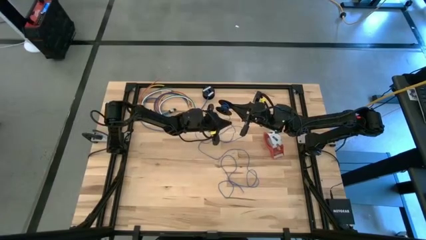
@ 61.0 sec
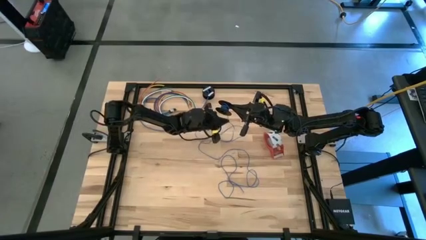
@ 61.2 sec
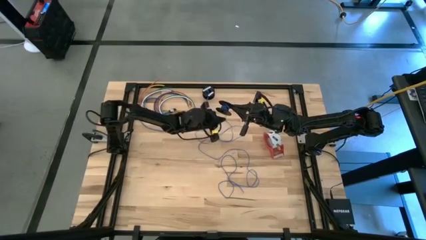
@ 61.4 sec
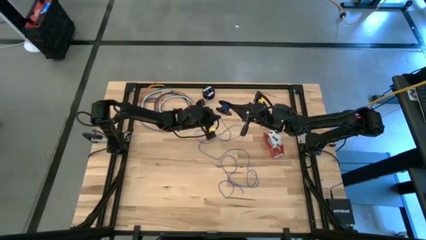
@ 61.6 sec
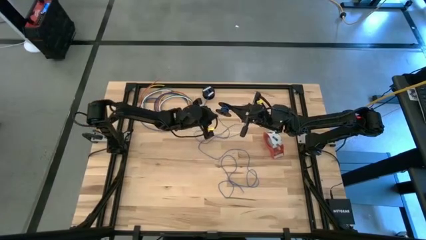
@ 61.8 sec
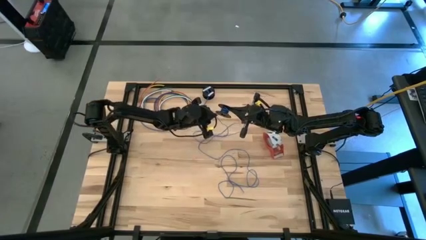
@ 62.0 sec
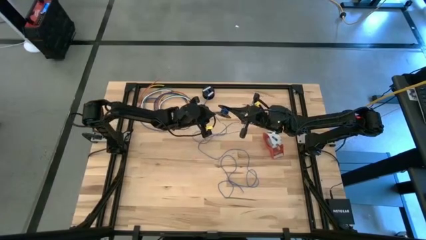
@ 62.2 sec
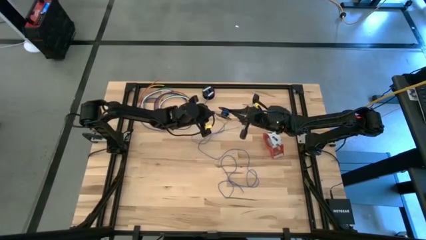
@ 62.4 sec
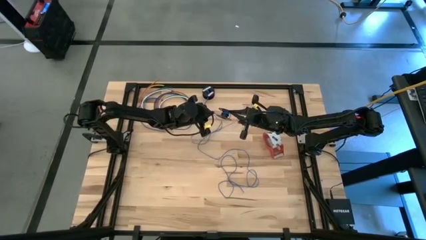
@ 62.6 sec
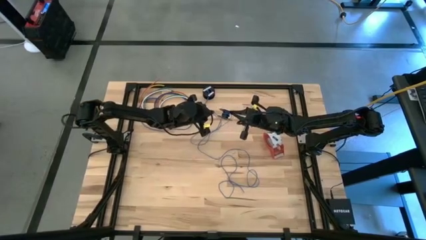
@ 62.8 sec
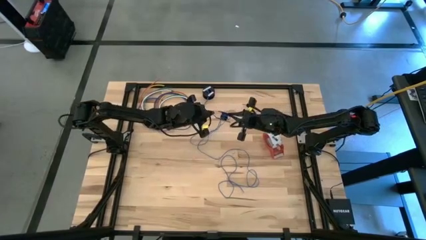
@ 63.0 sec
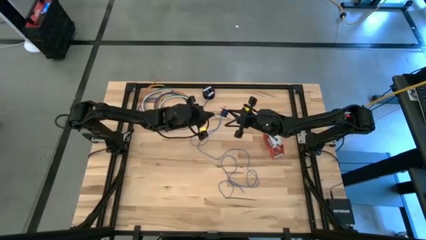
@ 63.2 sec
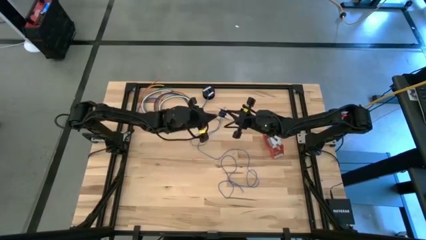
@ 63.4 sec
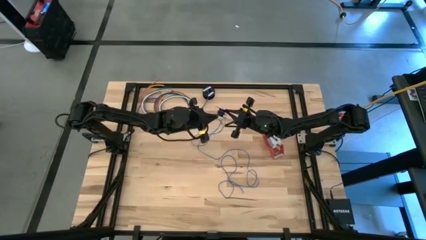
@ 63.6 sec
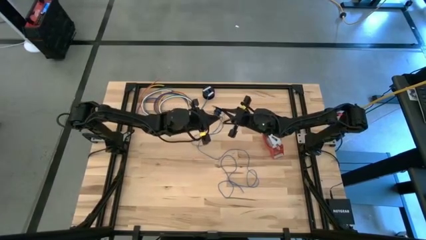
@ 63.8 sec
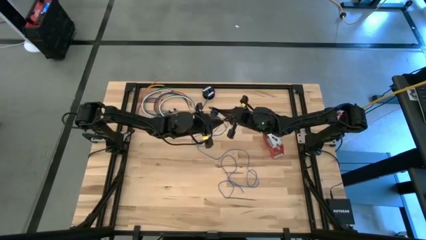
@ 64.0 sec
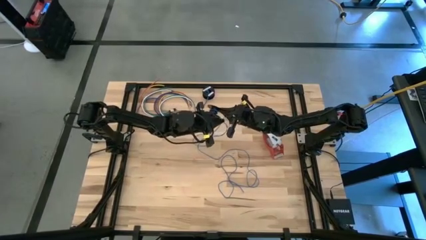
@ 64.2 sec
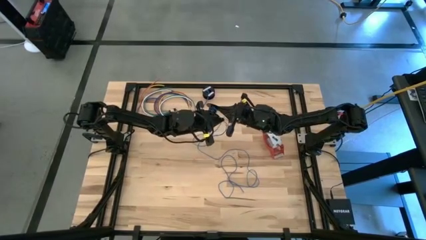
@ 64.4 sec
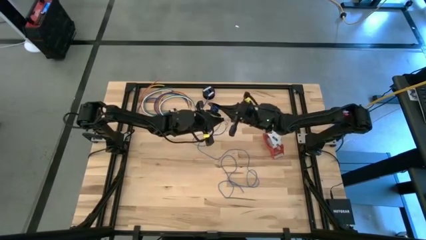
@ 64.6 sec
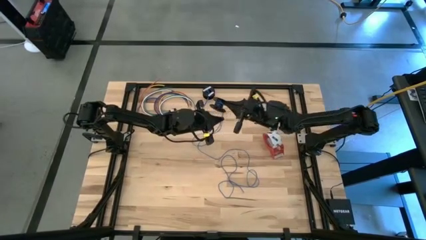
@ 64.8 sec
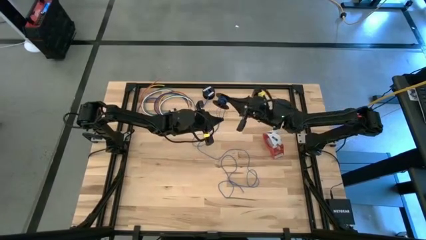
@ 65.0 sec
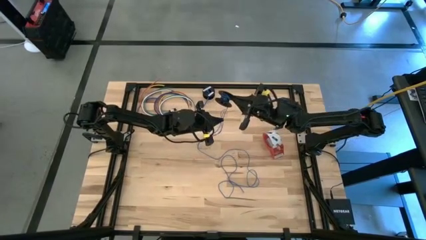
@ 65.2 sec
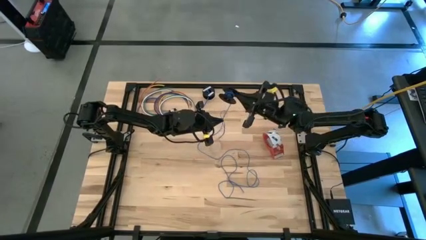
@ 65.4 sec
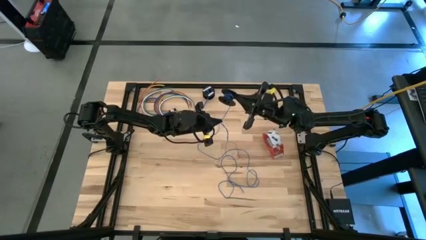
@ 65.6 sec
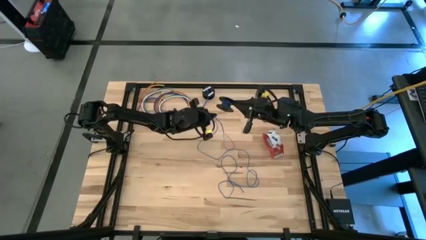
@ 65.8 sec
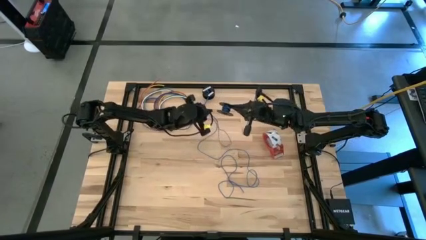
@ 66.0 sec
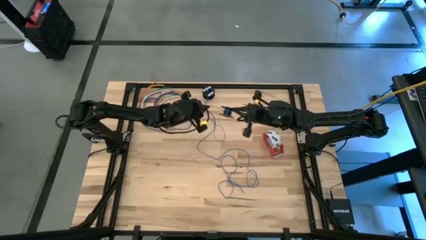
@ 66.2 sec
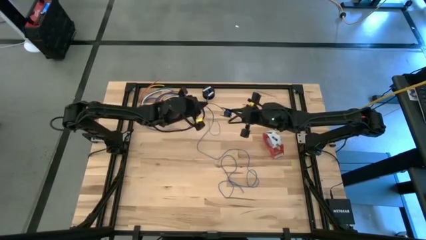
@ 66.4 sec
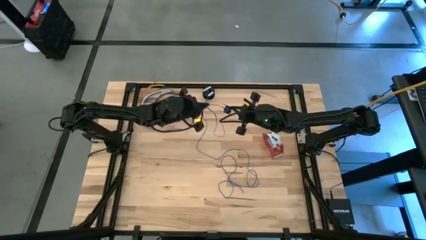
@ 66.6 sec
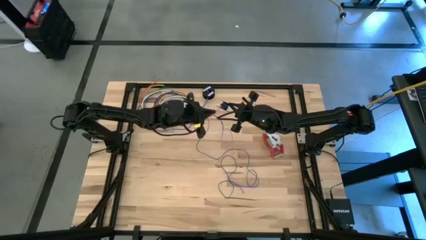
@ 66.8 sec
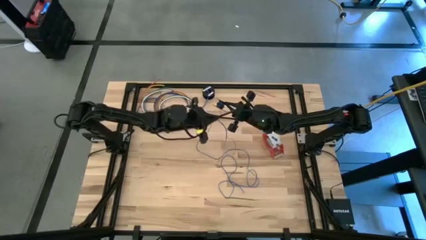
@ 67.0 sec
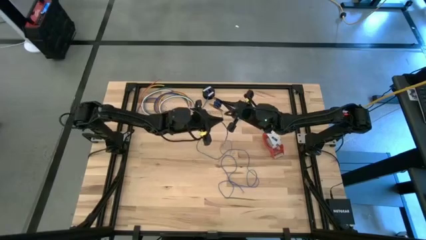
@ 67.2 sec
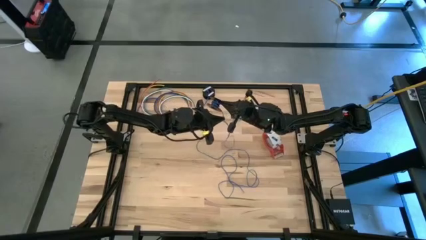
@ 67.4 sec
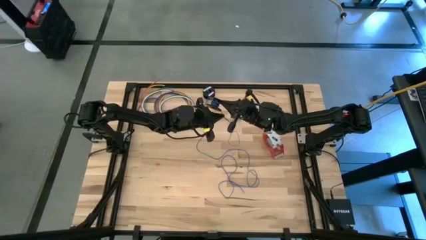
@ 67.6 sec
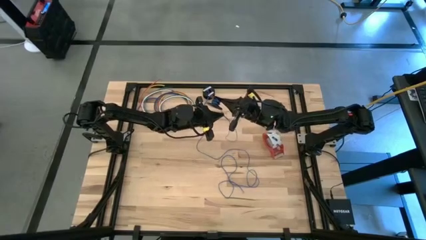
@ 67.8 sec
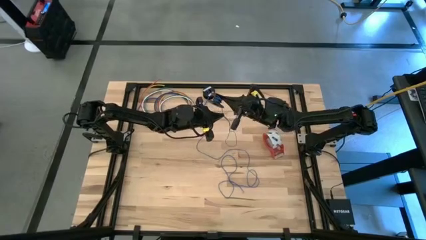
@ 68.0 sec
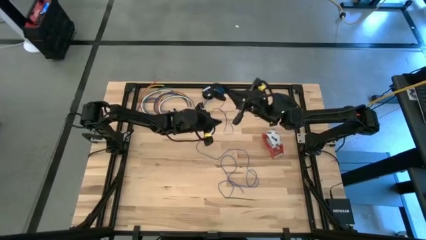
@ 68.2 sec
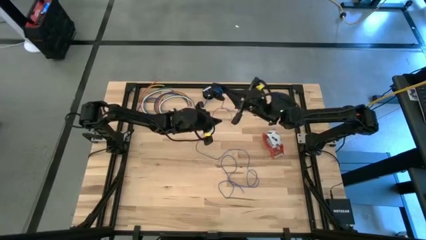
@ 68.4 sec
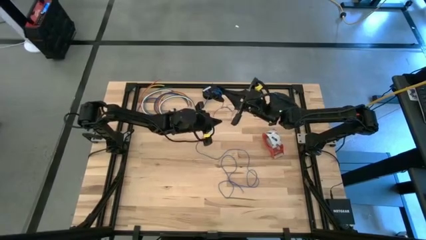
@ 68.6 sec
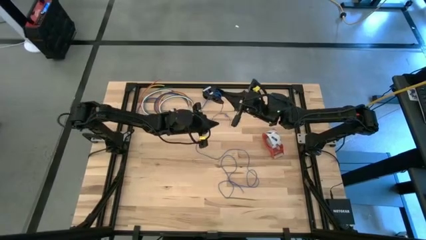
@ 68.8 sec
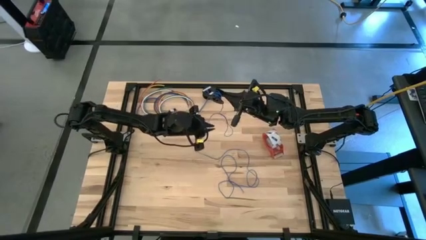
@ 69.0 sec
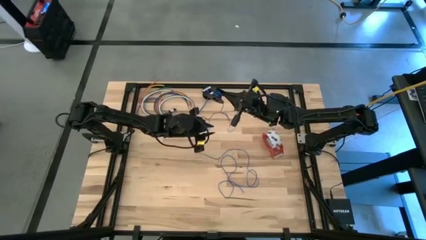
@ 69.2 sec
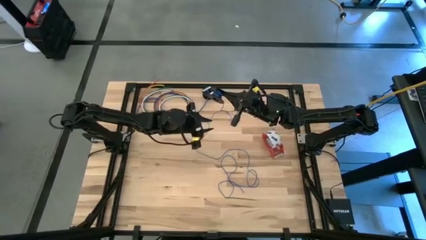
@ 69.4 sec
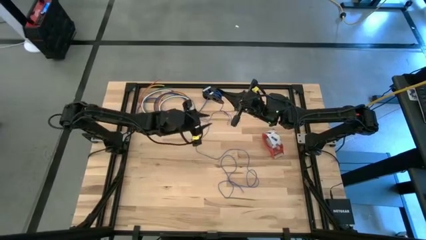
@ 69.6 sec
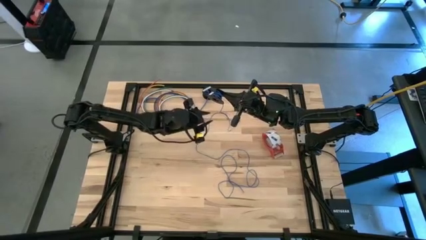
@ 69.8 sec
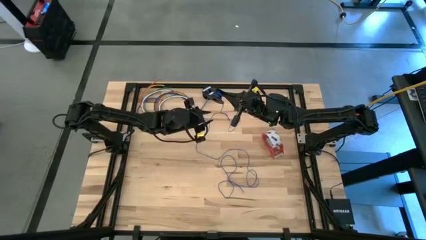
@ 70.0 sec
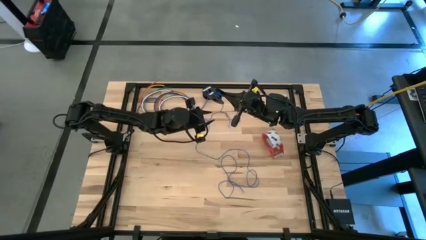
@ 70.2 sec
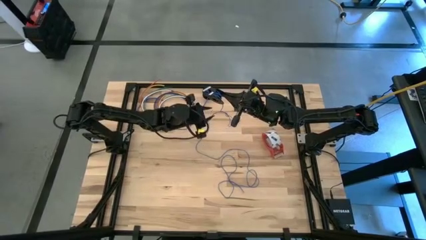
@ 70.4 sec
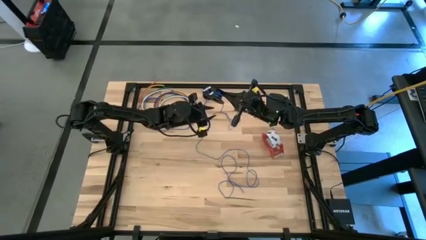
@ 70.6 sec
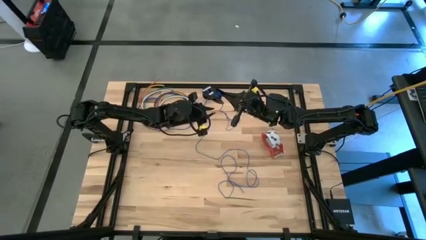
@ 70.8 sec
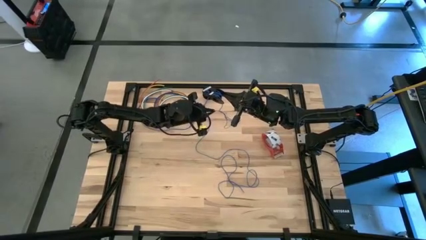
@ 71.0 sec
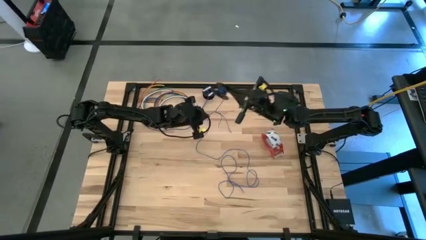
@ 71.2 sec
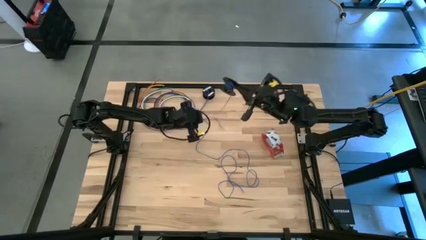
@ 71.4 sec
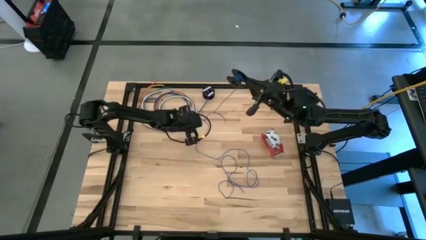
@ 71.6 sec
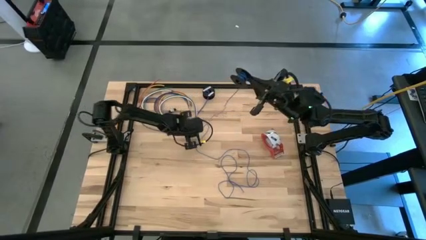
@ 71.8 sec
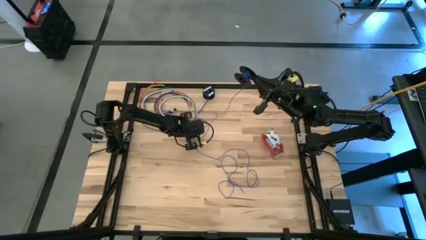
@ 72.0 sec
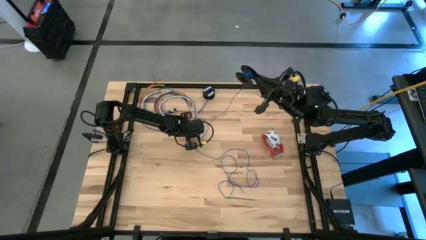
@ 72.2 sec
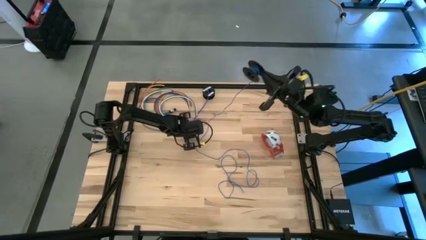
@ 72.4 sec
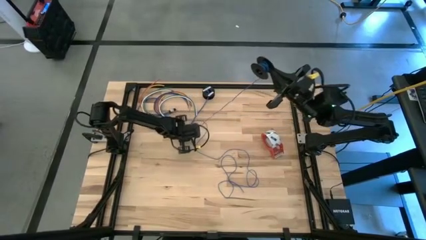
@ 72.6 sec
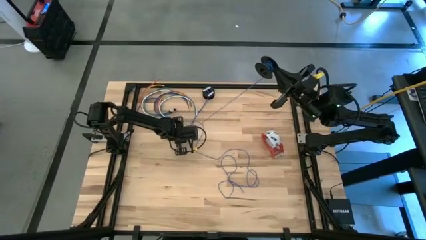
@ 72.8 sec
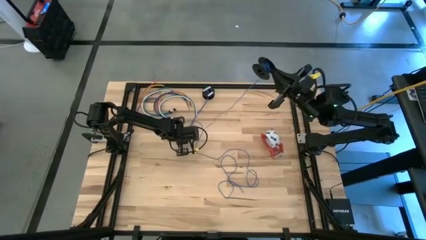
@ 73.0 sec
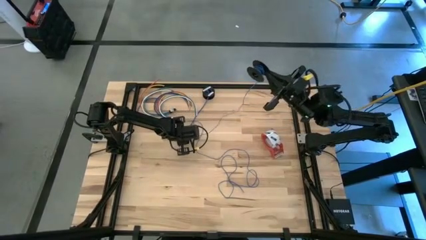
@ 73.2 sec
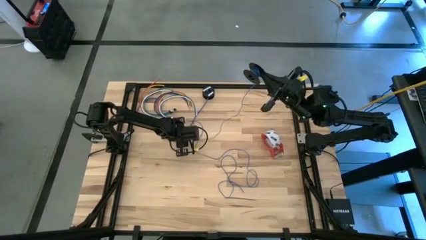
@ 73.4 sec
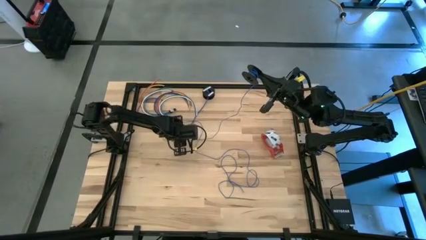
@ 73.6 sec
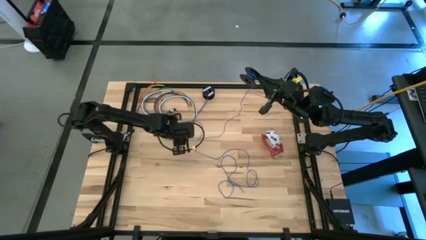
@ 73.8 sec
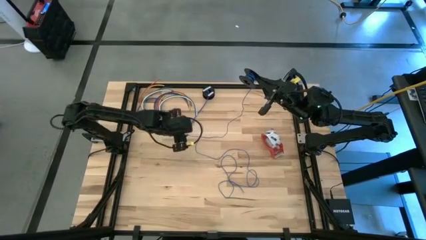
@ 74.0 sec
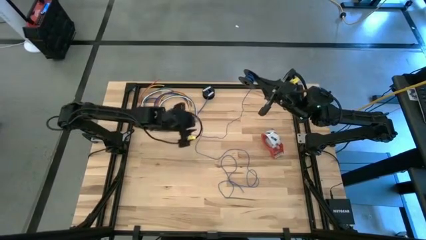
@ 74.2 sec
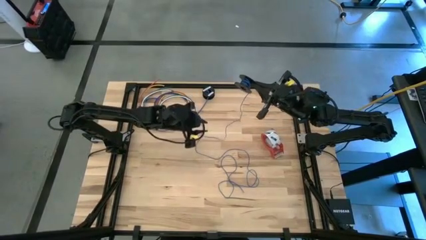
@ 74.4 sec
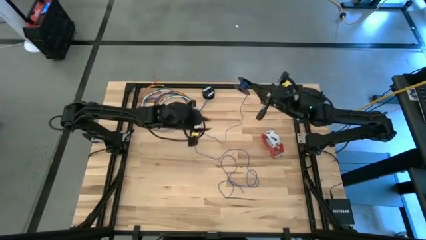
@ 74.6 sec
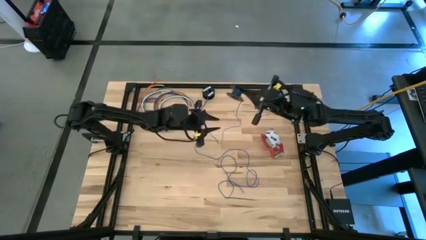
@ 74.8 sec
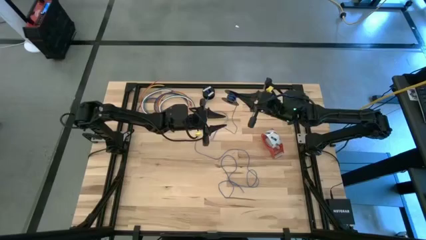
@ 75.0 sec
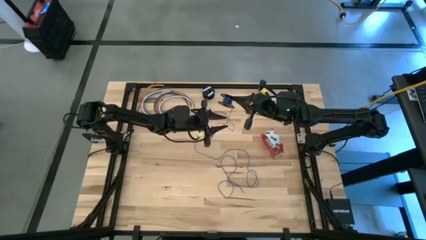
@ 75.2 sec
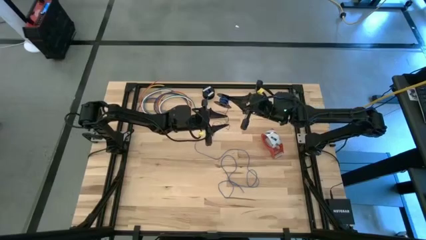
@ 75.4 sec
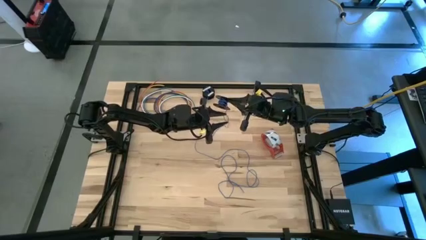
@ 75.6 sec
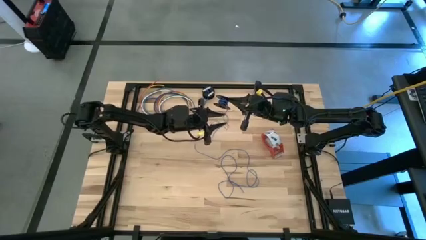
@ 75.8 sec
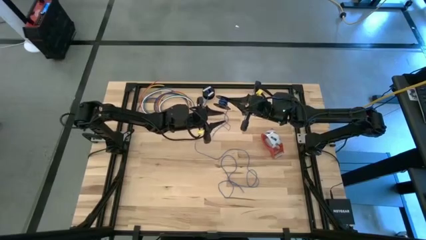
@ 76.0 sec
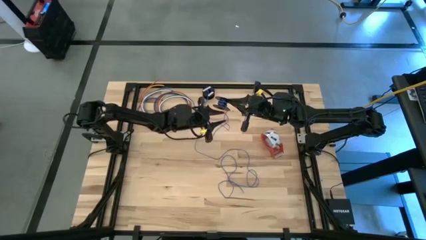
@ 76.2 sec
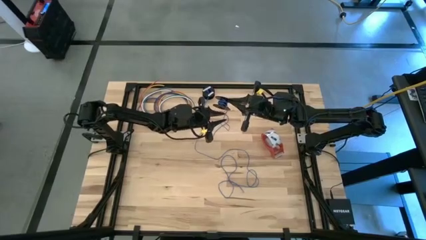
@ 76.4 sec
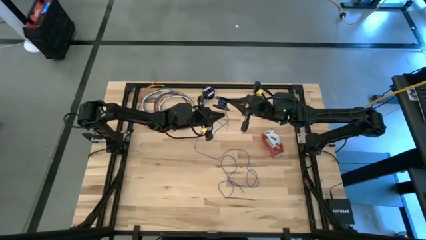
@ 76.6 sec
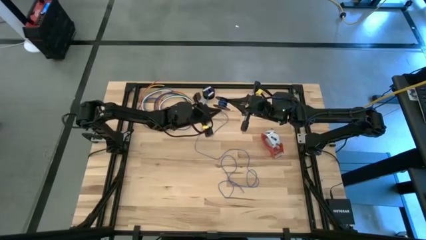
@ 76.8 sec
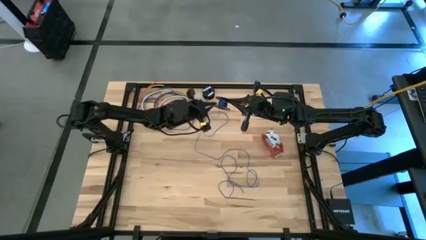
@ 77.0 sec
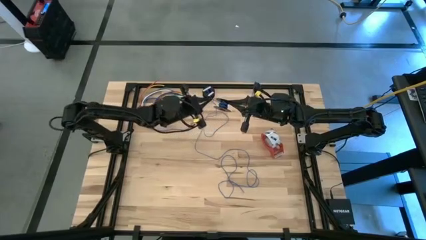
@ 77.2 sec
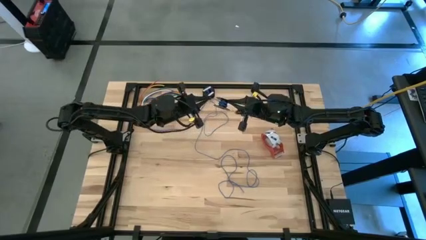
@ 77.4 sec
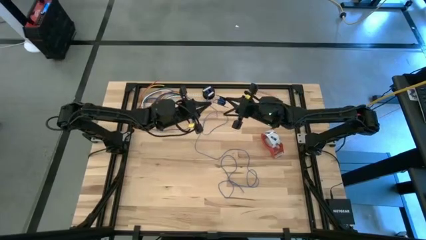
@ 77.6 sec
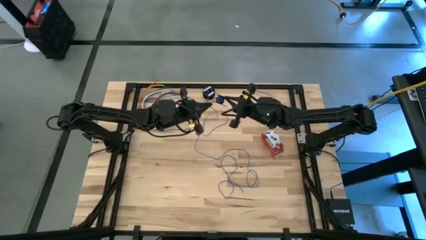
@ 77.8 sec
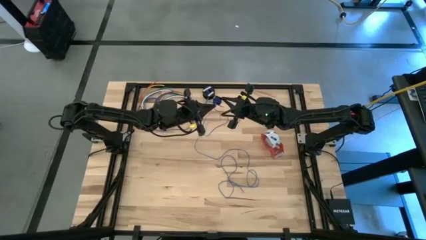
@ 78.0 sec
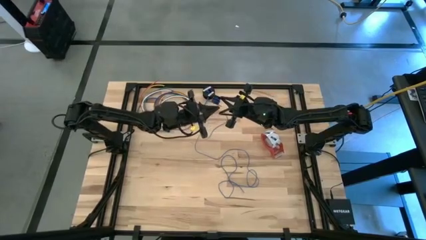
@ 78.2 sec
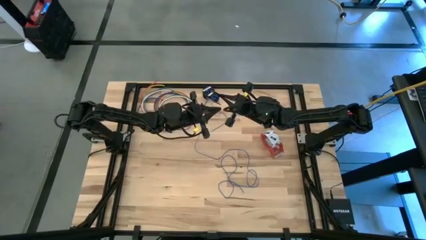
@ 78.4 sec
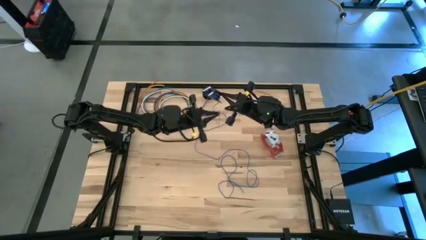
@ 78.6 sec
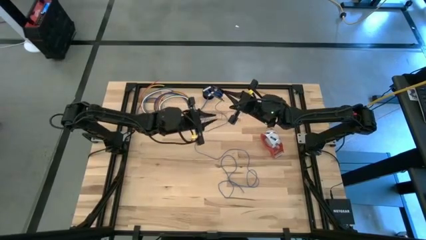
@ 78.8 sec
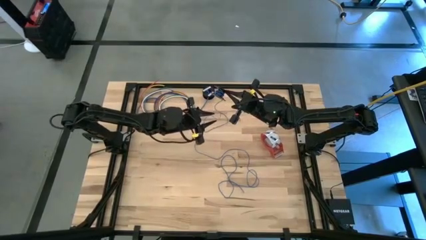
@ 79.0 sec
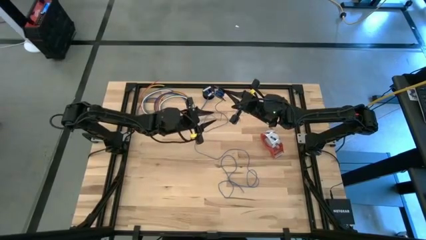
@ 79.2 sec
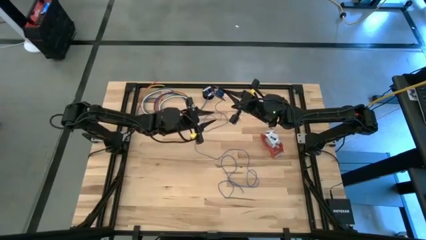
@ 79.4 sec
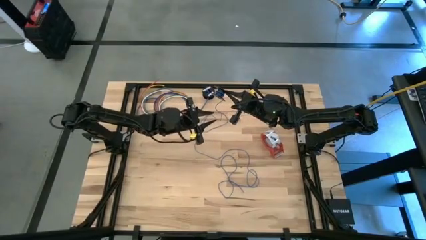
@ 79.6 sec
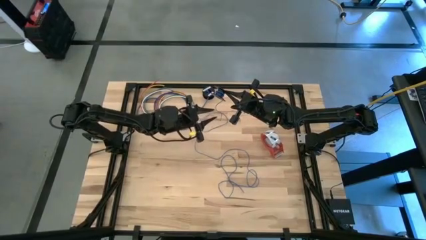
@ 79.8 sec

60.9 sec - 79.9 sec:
Task: Coil cords
Coil the blue wire onto the spool
